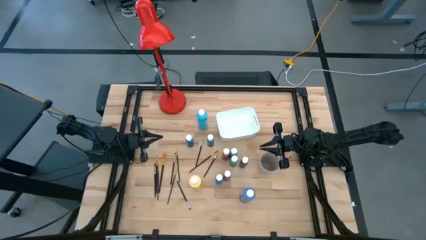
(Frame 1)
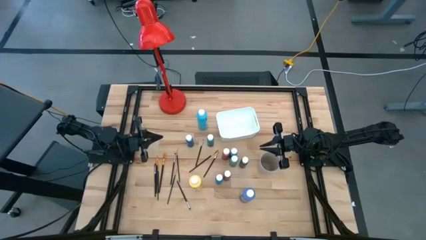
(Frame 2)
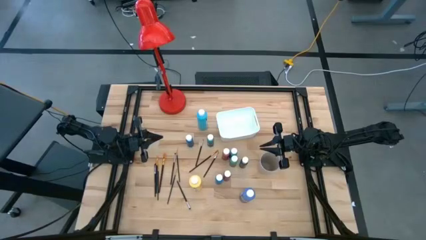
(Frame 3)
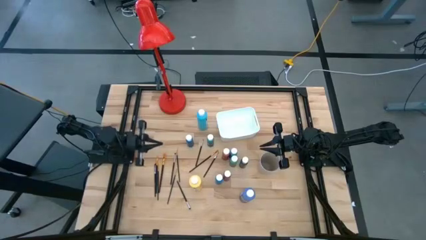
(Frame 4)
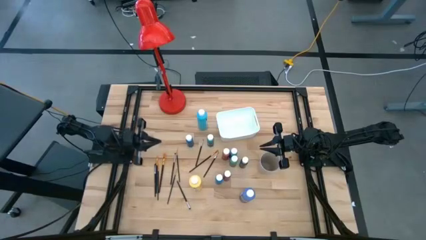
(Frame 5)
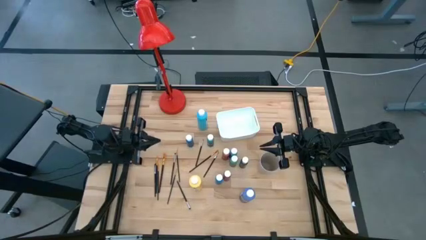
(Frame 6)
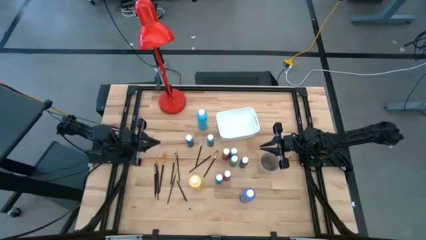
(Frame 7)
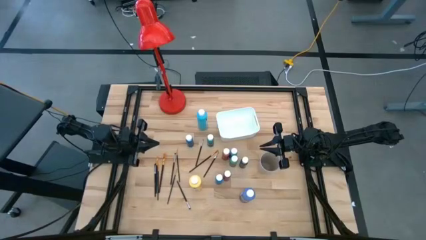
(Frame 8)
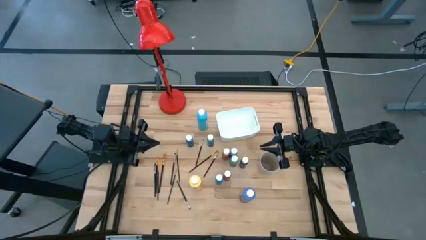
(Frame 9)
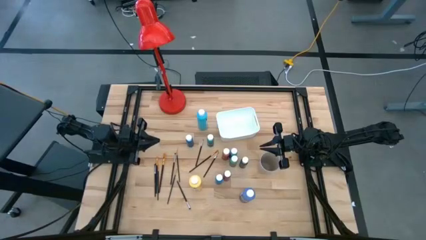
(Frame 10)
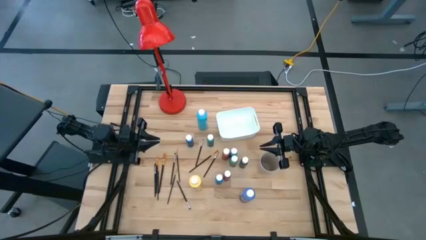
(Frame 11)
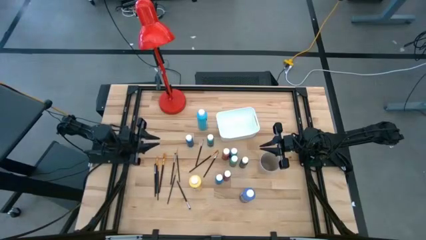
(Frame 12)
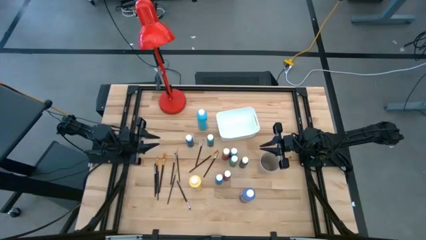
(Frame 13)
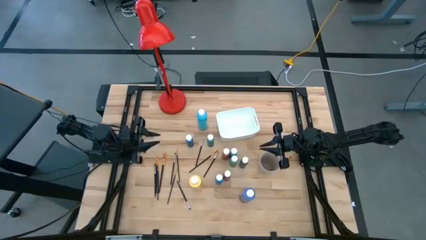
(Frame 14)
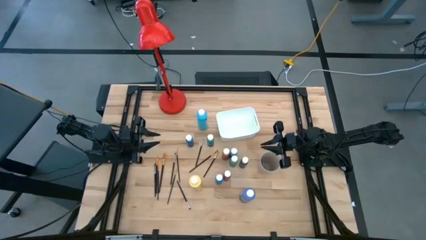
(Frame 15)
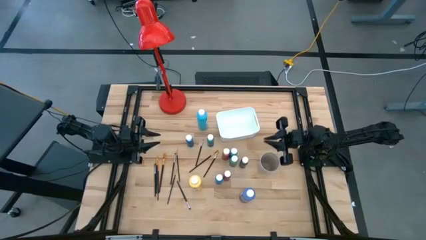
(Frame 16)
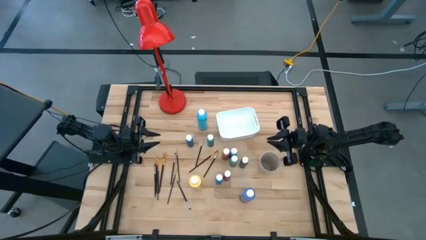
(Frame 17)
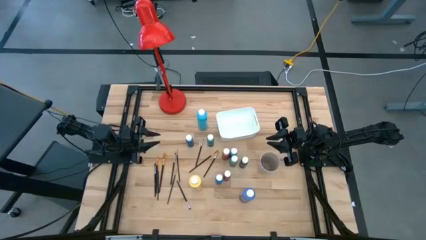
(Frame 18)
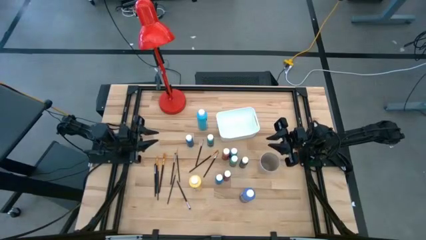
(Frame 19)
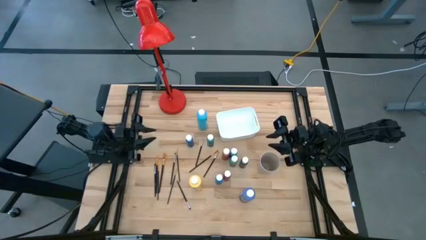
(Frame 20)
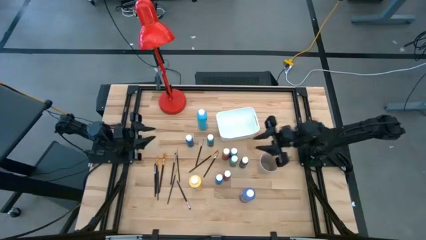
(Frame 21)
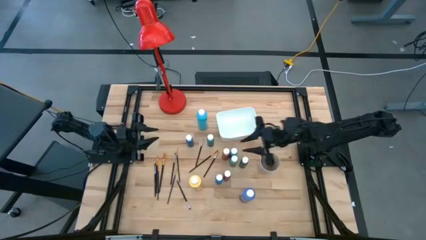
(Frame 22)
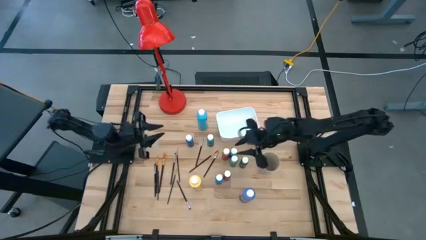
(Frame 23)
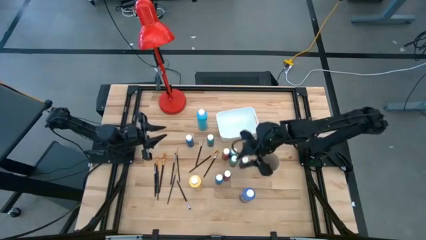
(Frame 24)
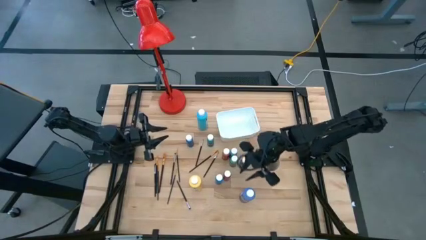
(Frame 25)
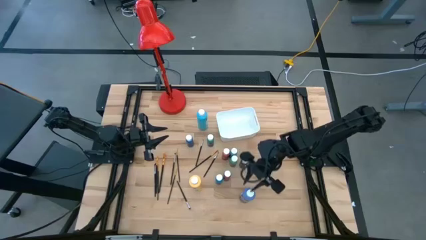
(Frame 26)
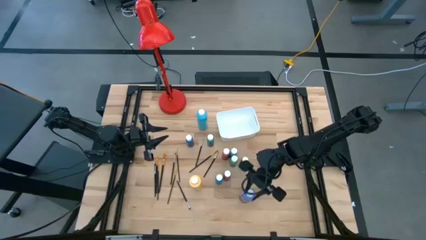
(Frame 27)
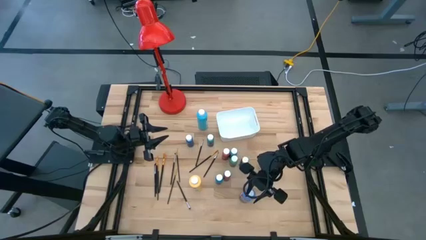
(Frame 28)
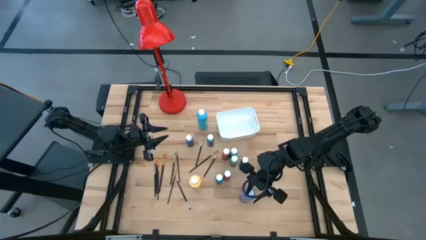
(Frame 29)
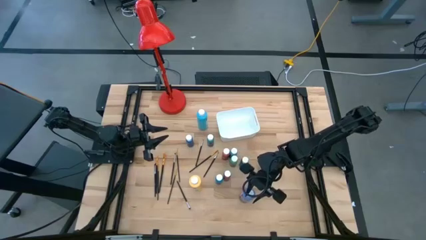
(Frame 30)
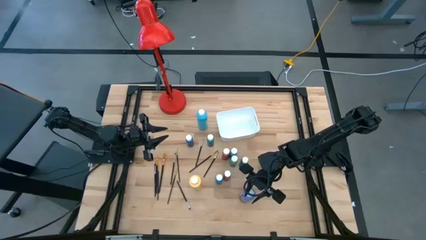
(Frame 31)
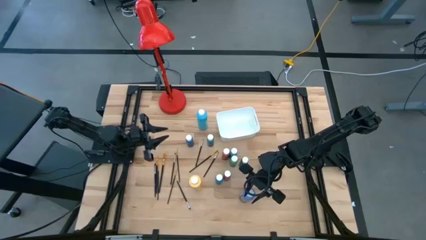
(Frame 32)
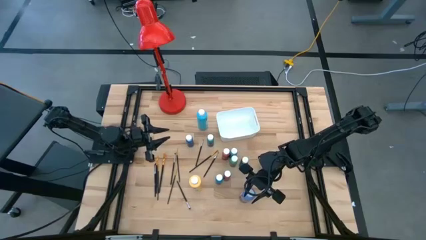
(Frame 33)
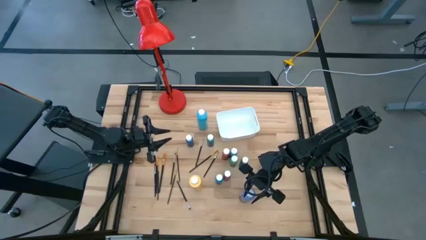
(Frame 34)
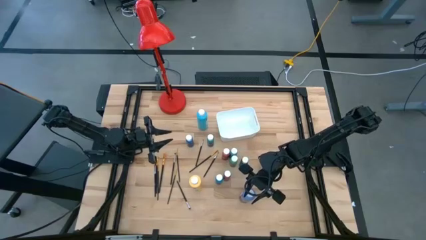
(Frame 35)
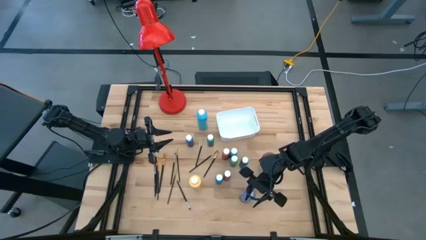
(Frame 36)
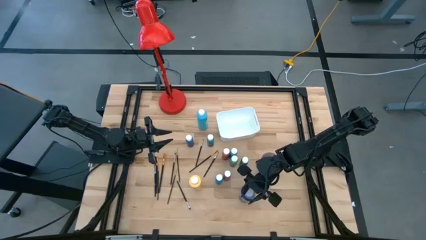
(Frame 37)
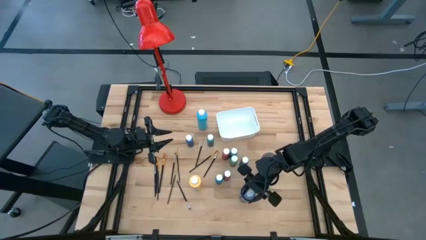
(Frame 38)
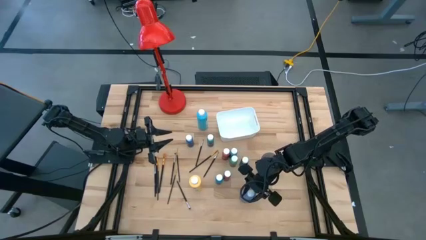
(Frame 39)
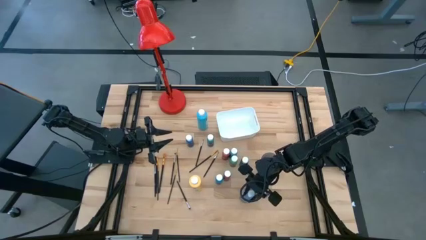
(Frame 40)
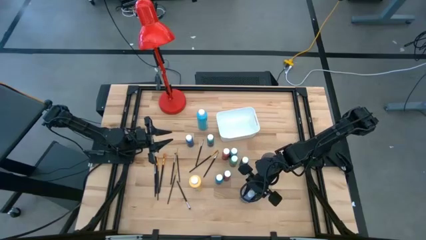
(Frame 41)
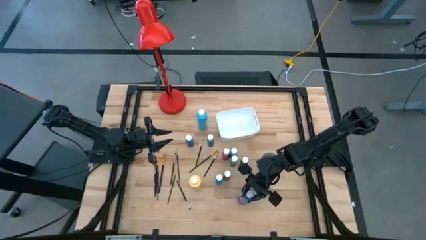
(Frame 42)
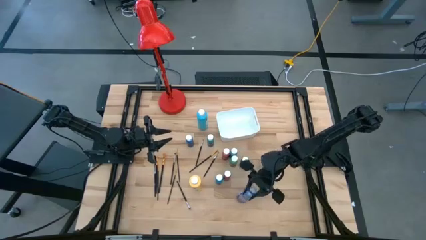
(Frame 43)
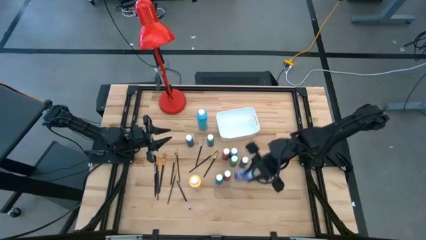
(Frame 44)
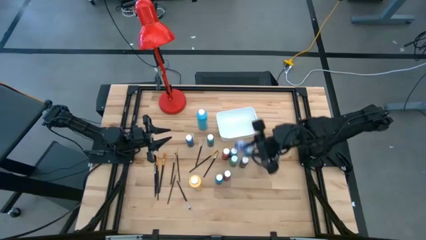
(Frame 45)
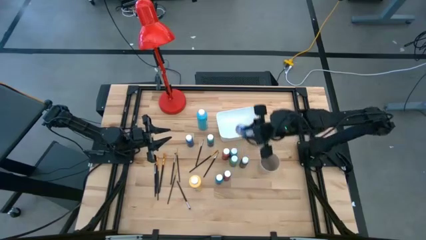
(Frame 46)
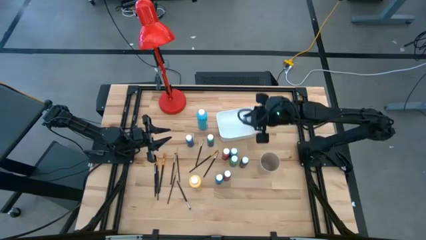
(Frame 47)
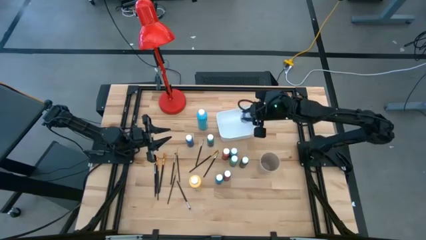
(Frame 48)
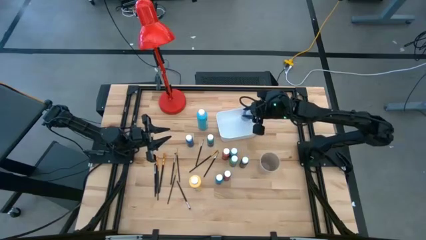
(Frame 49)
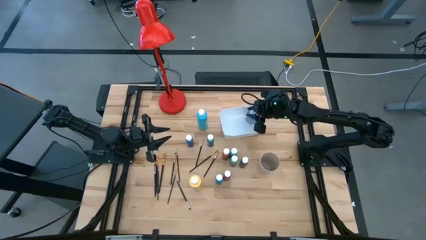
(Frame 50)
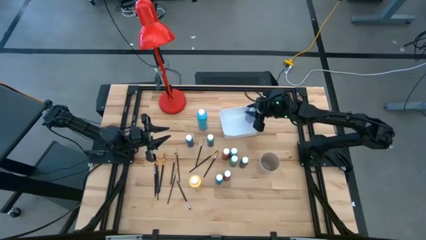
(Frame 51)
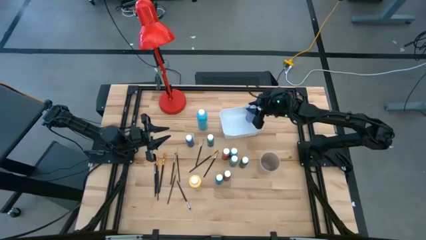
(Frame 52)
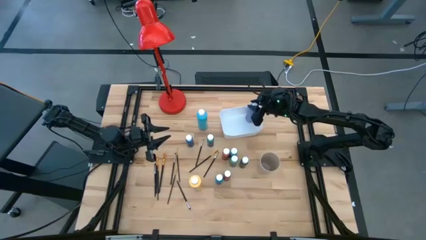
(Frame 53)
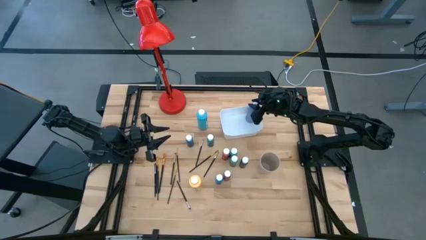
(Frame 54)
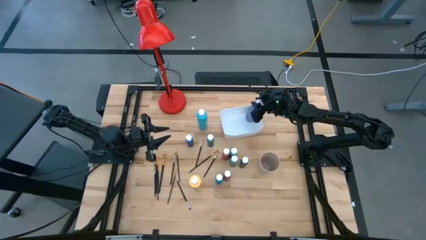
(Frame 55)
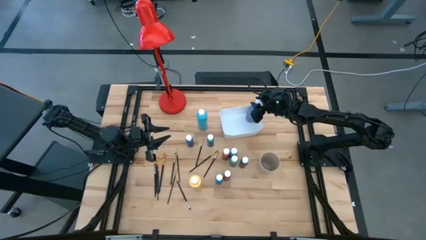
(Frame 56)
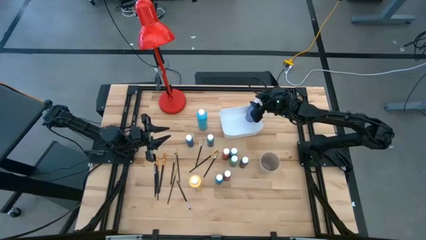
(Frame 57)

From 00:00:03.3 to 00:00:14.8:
Task: Pick & Place Paint Supplies
Put the purple matte acrylic craft paint into the white bin

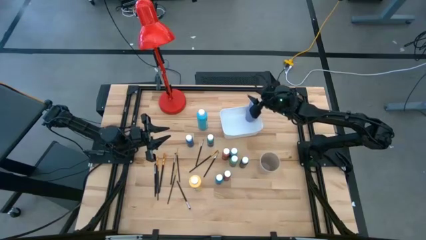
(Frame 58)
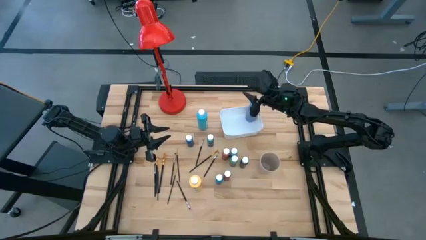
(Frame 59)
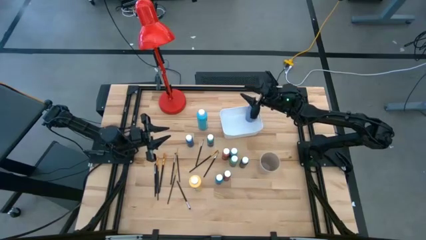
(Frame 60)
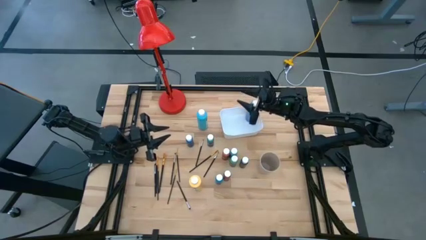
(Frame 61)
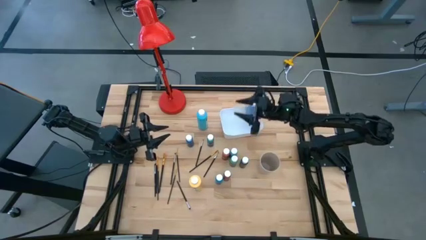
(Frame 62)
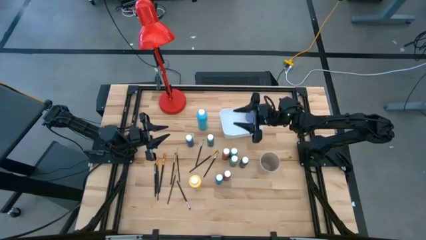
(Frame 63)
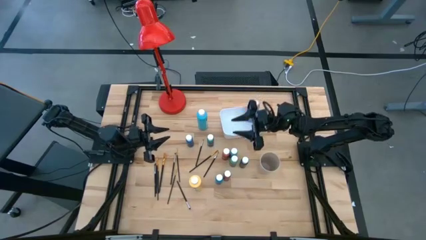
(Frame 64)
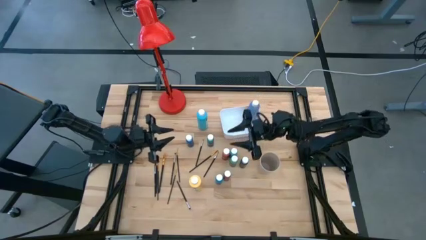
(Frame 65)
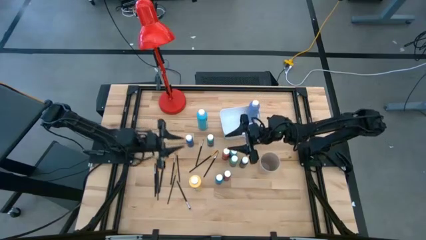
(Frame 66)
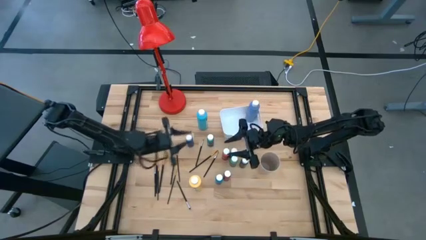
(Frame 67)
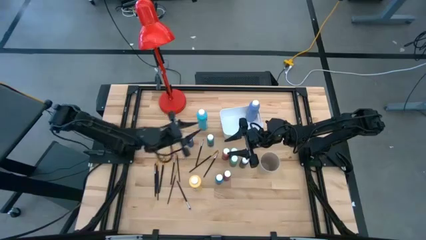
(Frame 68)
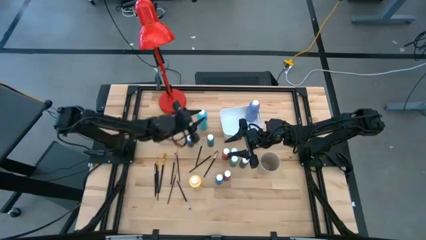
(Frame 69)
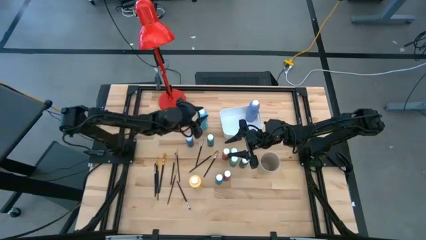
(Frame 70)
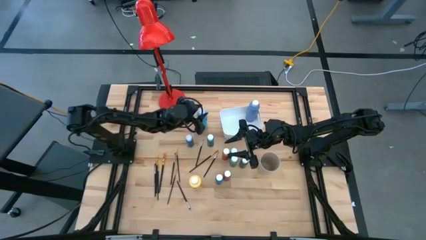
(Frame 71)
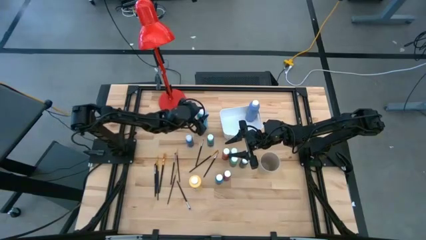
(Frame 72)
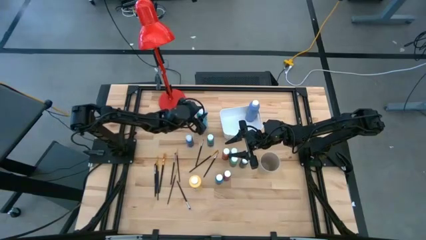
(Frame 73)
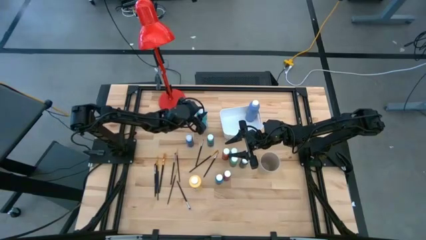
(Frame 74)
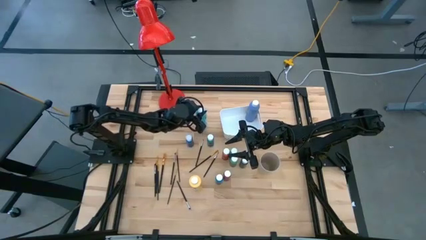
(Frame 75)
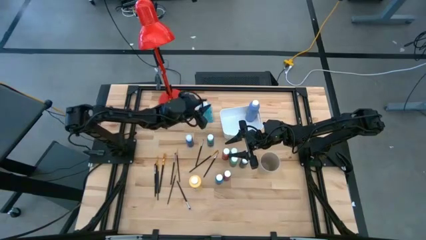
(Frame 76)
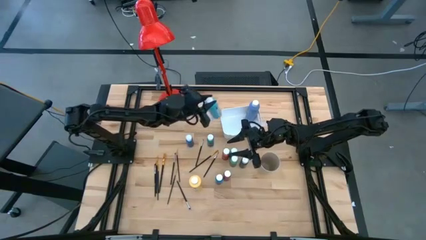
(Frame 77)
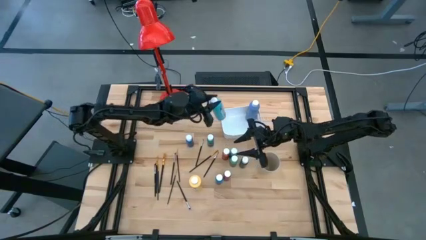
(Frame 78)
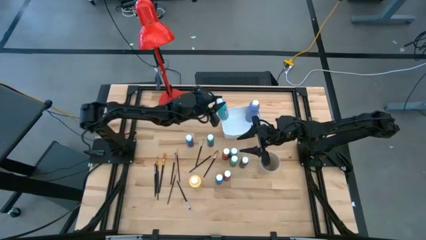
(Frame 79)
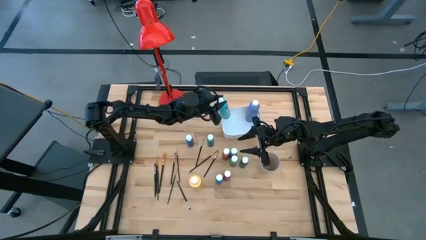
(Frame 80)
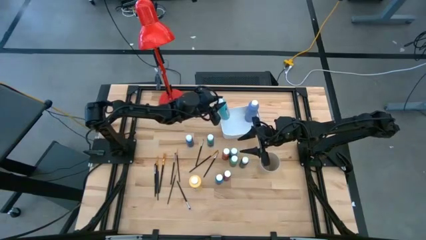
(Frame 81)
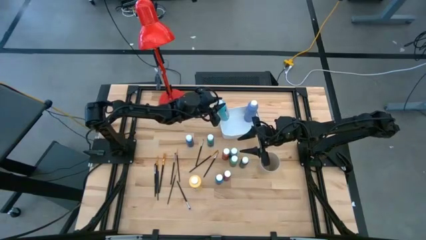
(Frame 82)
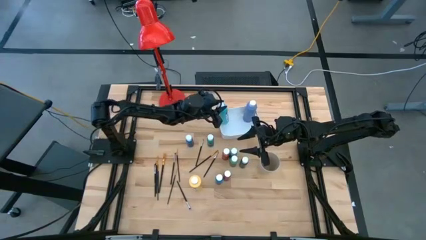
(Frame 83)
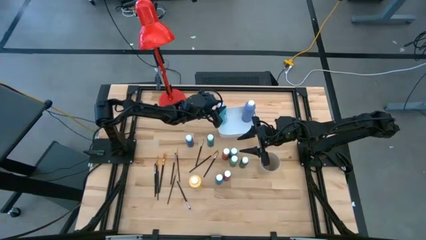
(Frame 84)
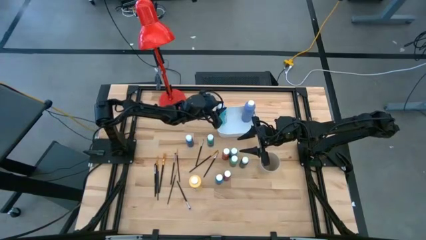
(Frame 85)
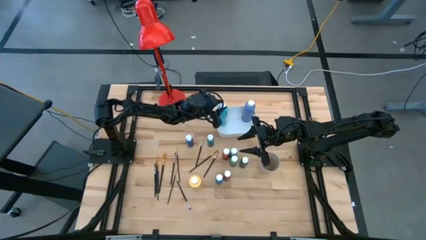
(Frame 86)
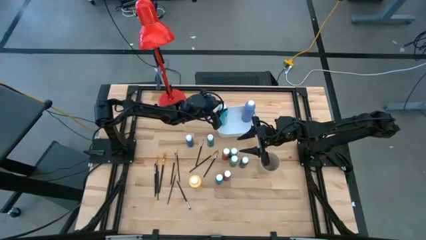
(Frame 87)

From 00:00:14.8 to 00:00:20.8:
Put the light blue matte acrylic craft paint into the white bin
